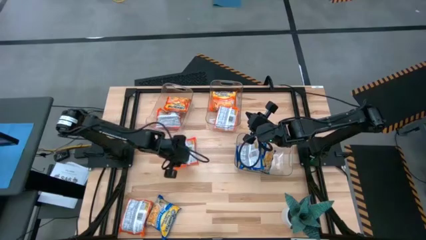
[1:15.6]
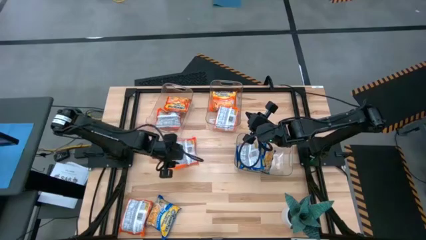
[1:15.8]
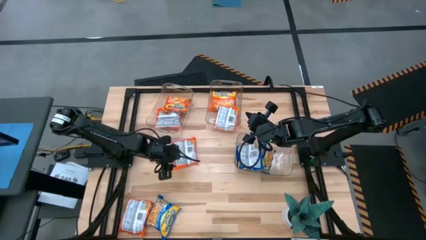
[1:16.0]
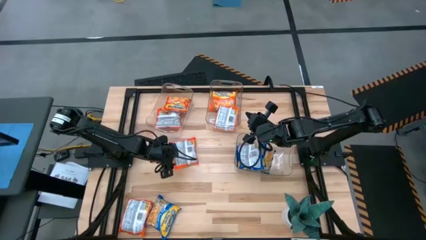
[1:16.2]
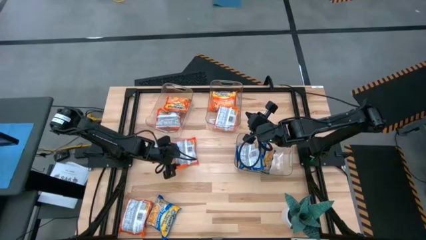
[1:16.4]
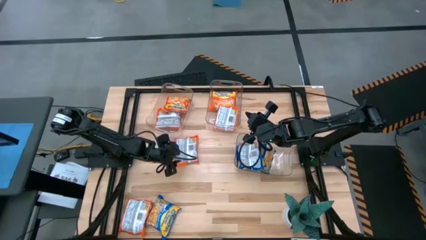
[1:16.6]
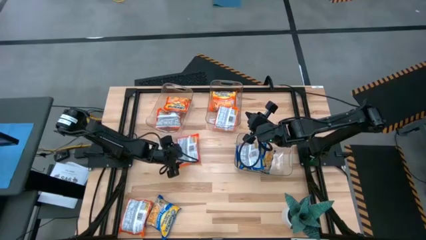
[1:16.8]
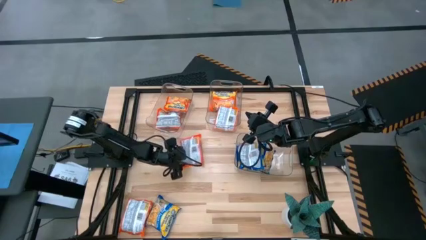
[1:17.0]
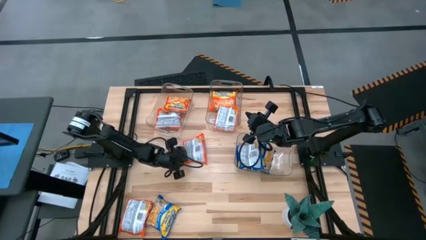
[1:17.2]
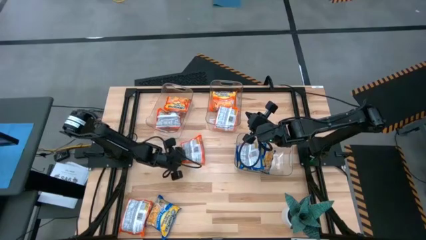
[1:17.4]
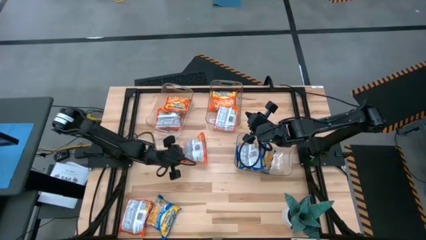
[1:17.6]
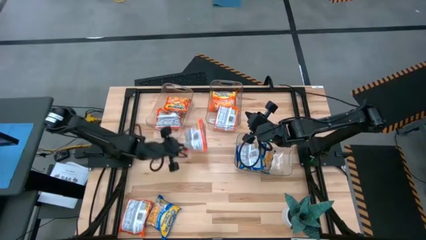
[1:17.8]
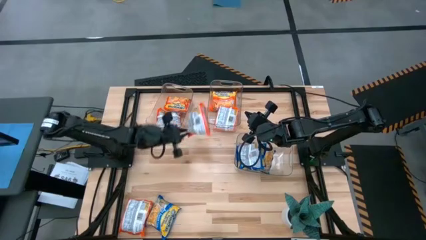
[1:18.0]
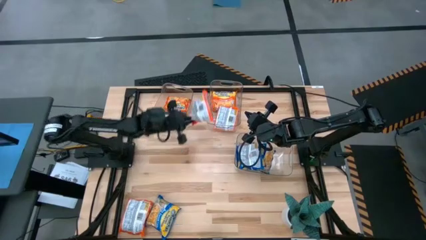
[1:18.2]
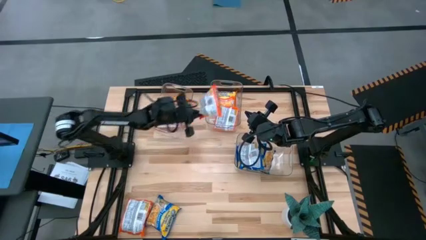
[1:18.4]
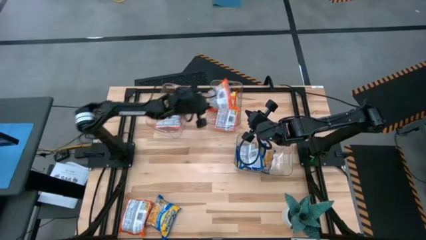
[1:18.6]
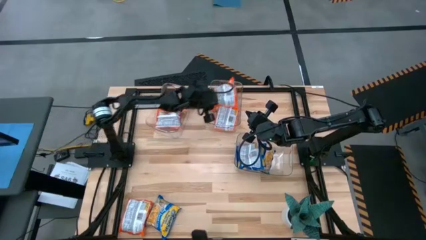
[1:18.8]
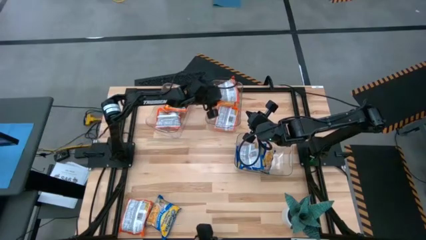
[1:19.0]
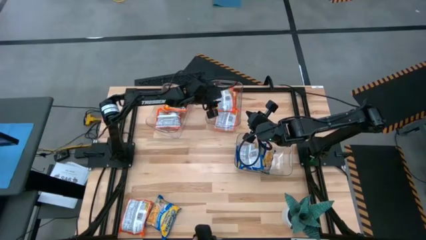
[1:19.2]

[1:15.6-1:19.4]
Task: Sort Maruchan noodles
Put the orange bag into the top right transparent bin

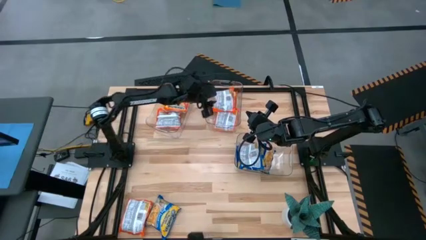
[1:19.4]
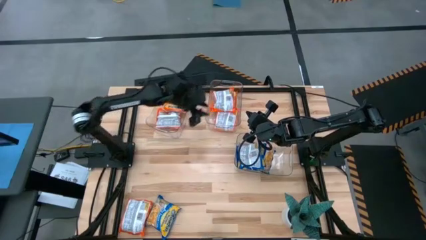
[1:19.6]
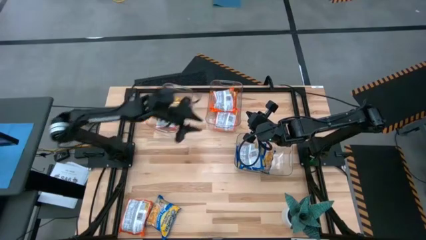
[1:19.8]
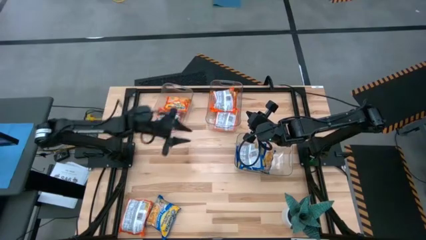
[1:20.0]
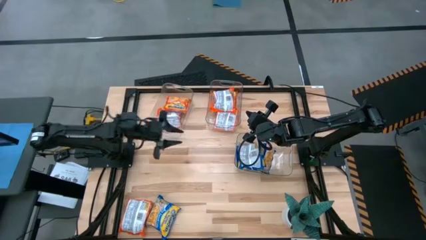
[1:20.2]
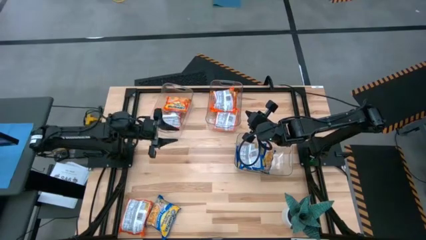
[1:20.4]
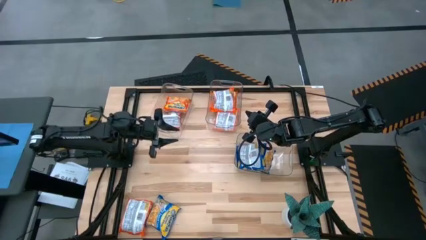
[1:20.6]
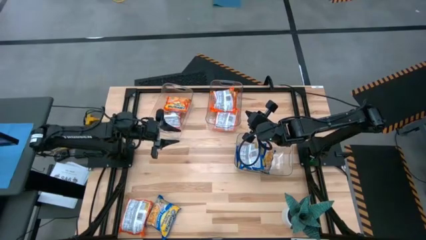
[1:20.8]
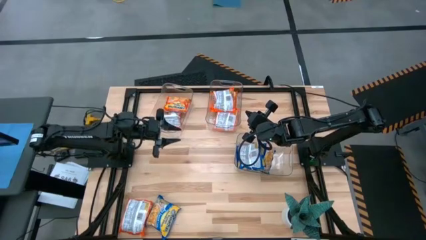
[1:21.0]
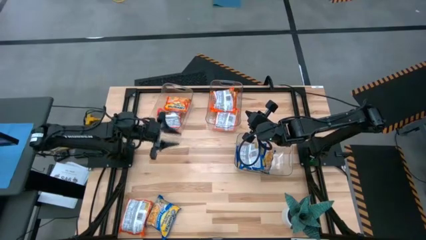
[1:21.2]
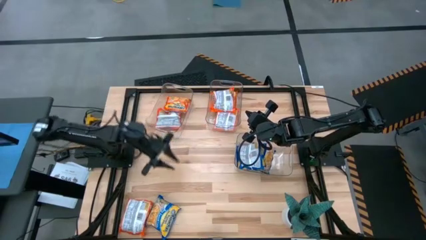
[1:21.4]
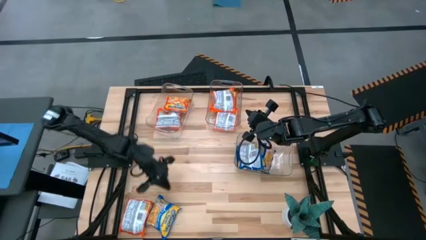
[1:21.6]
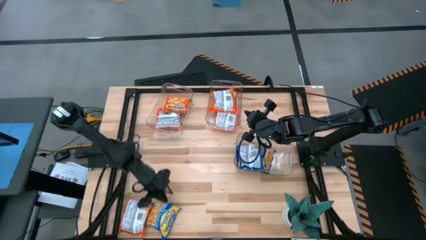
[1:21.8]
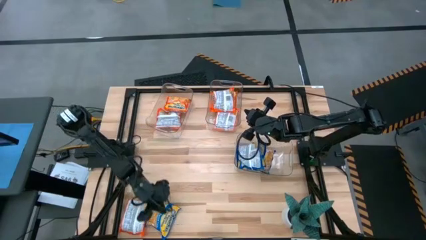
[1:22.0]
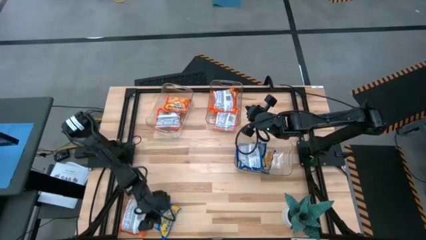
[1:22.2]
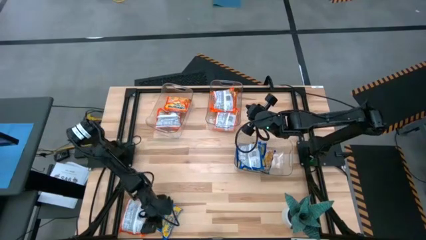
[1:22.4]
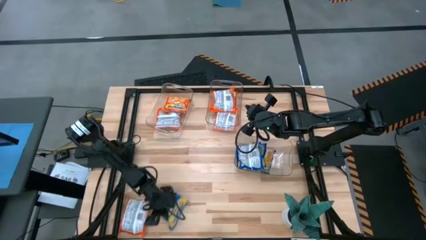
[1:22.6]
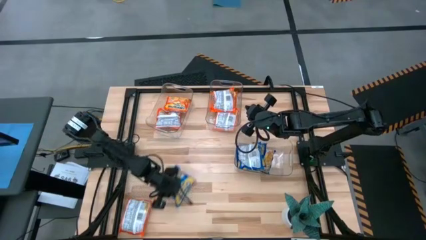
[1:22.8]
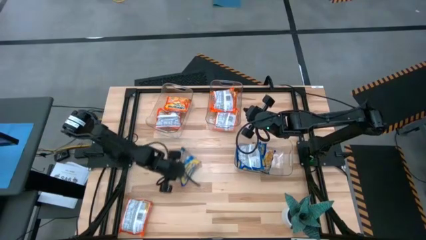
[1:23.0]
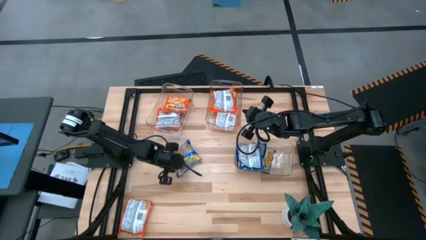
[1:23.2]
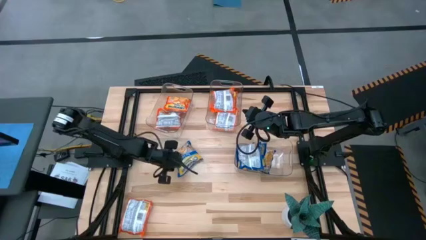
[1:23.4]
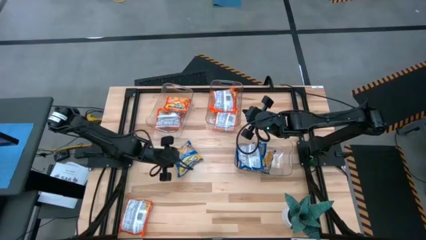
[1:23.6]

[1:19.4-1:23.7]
Move the blue bag to the center of the table

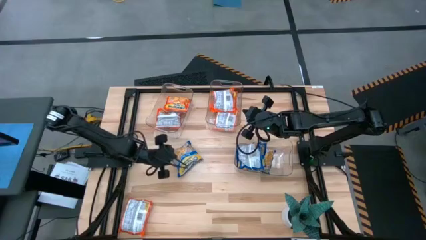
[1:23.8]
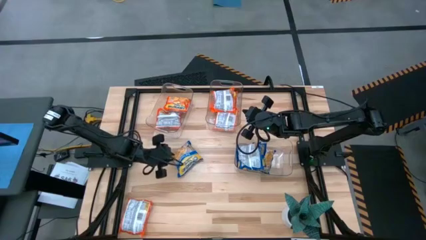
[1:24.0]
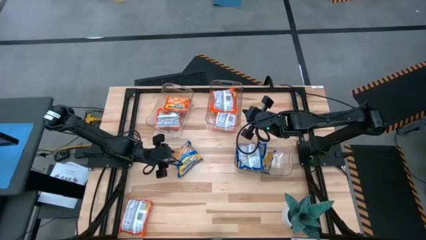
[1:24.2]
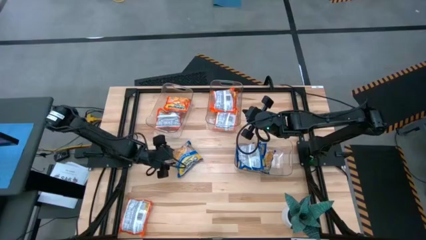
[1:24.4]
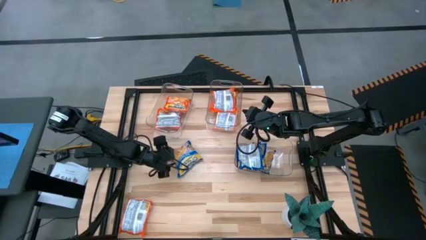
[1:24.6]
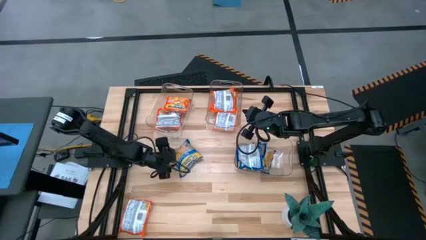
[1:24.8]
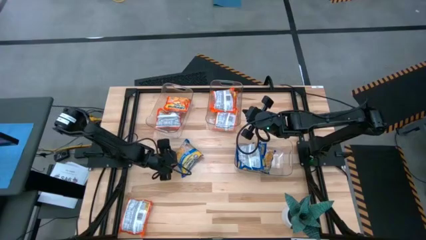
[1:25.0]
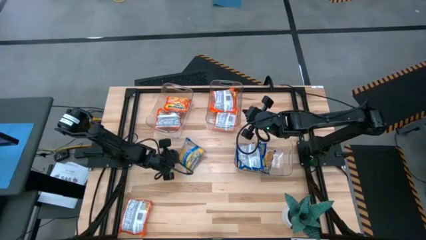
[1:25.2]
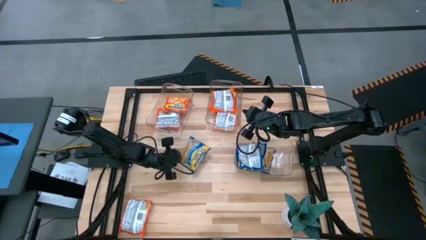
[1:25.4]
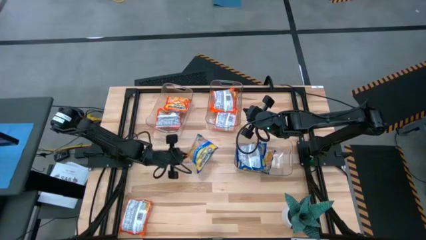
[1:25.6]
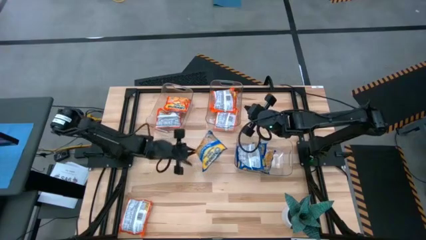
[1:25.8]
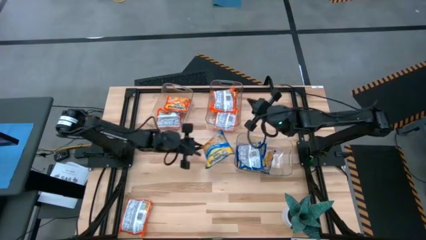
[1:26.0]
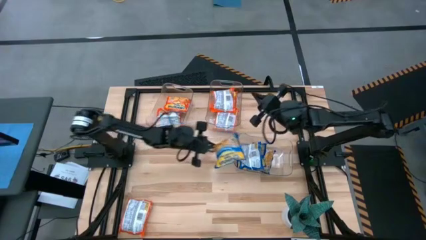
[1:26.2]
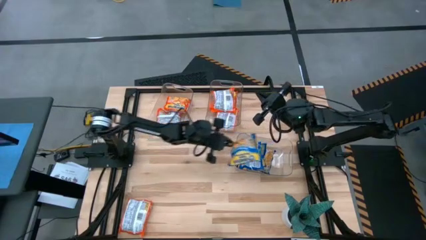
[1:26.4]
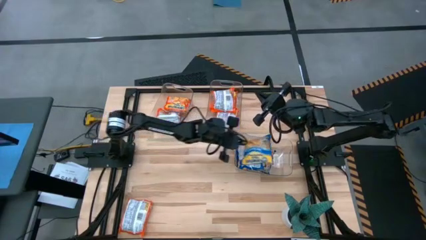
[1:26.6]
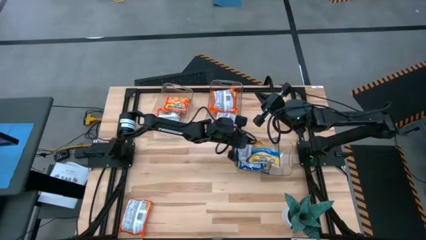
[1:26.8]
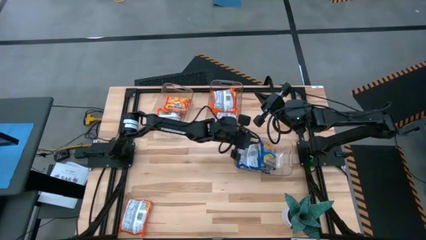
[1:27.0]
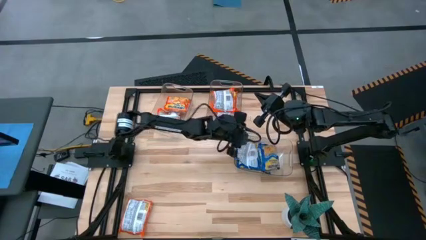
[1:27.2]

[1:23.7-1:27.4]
Put the blue bag into the right transparent bin

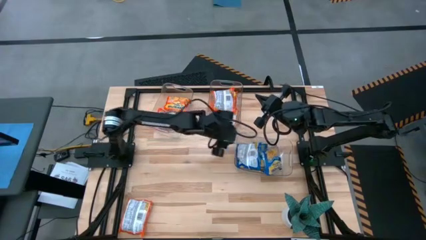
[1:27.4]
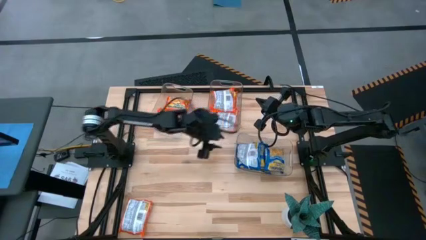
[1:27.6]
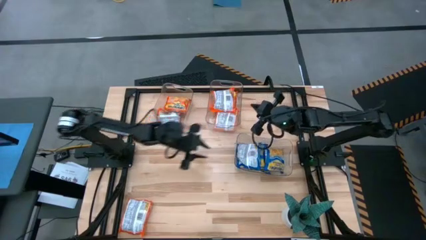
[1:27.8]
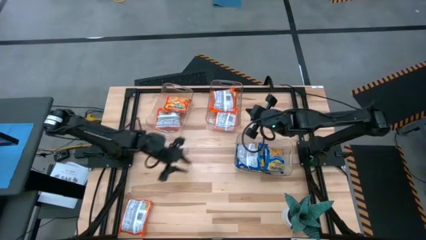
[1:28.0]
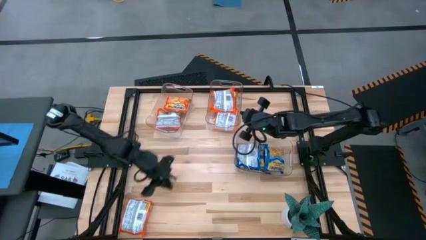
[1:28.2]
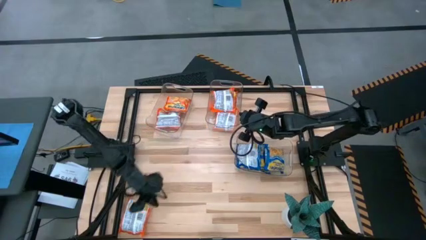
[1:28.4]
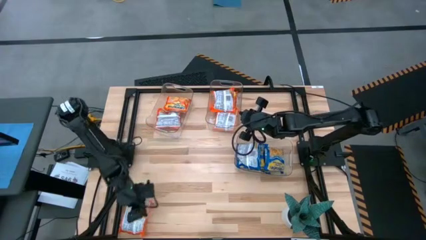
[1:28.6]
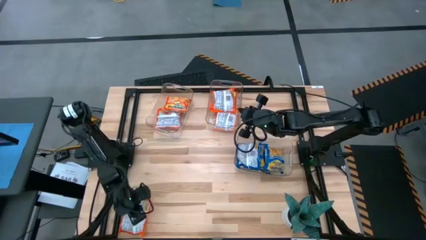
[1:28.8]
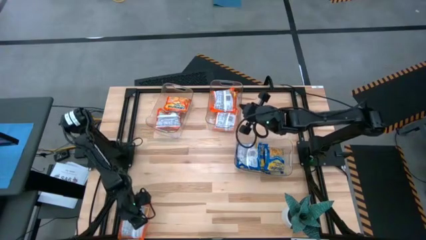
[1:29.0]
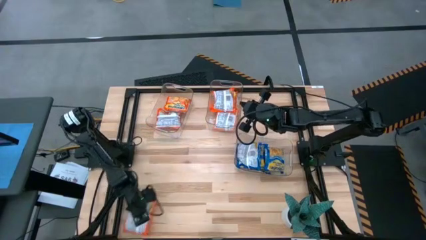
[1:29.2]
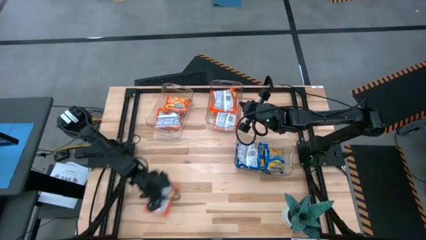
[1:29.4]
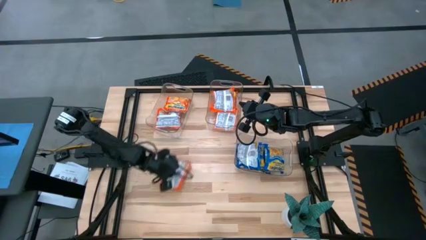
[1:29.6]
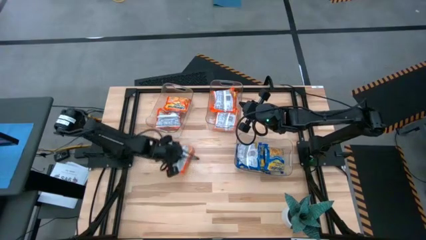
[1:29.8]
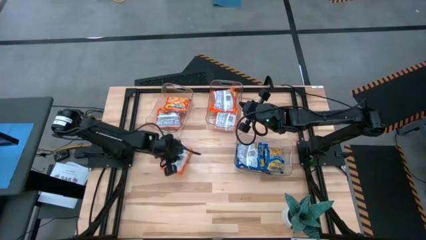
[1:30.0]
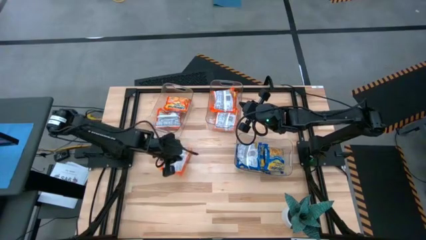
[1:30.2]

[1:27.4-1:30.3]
Move the orange bag to the center of the table

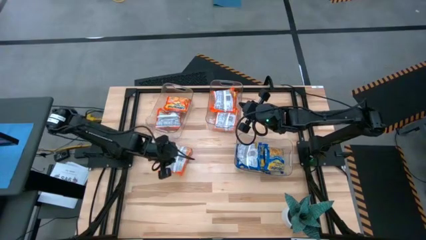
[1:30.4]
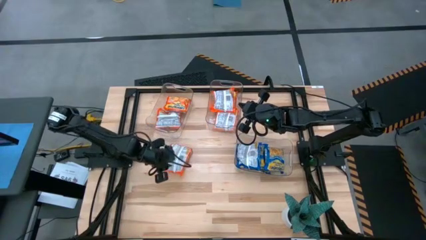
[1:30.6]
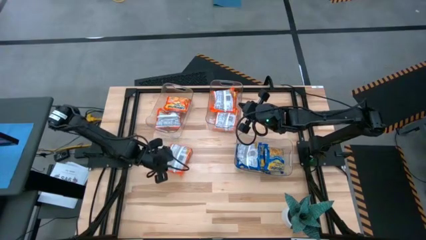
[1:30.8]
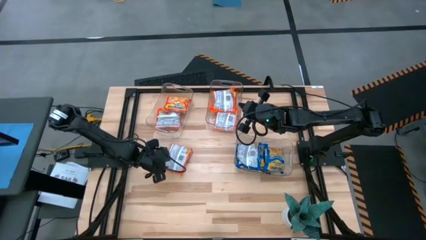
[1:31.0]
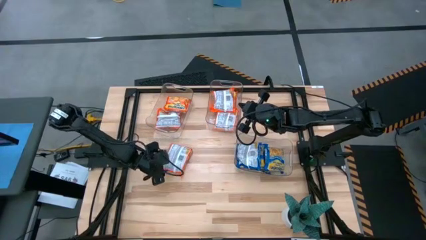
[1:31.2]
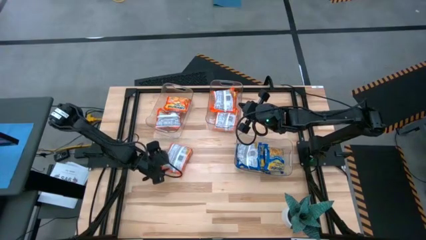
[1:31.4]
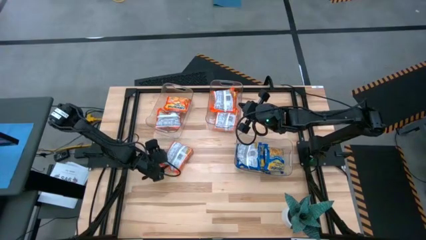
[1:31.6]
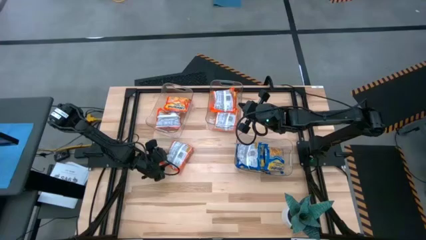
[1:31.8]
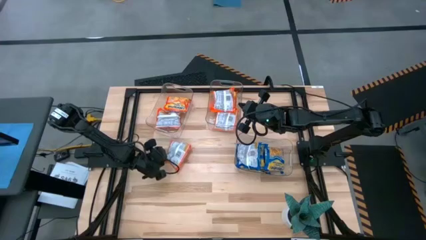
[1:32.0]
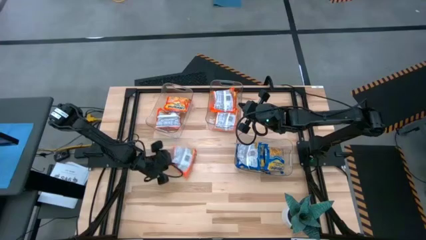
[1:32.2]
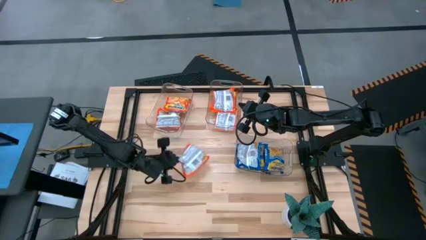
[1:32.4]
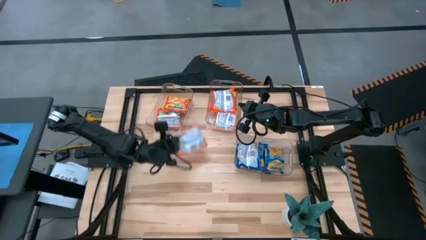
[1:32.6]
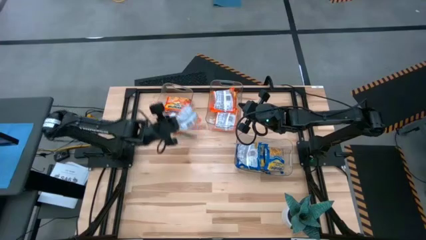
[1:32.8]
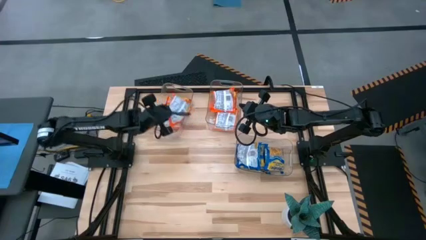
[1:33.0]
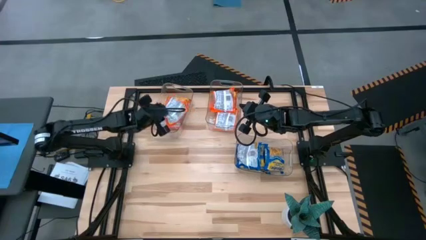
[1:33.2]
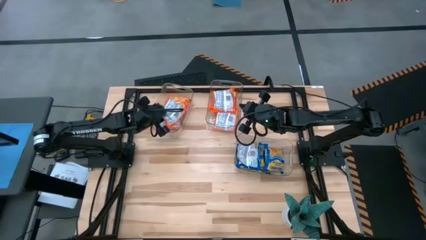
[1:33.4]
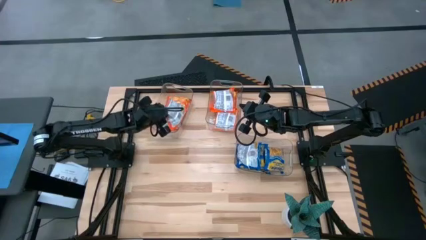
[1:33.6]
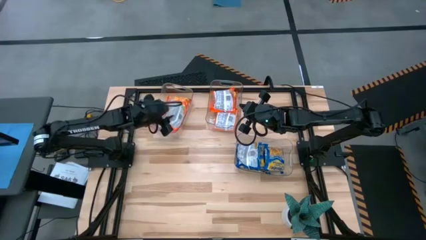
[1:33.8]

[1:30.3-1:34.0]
Put the orange bag into the left transparent bin
